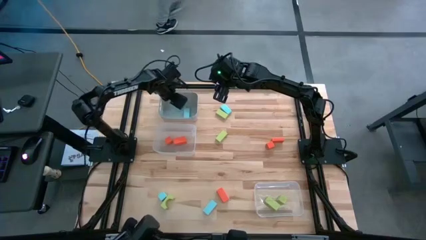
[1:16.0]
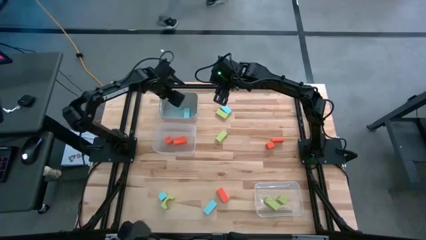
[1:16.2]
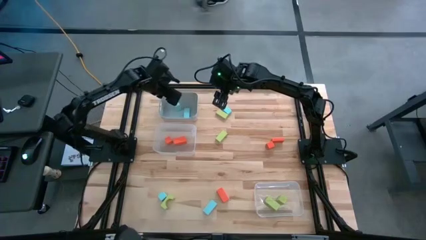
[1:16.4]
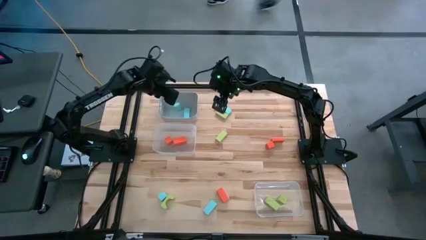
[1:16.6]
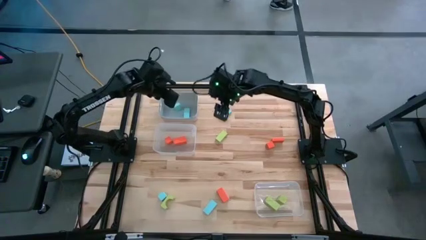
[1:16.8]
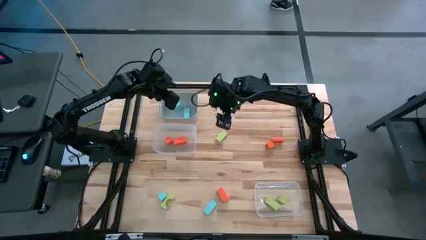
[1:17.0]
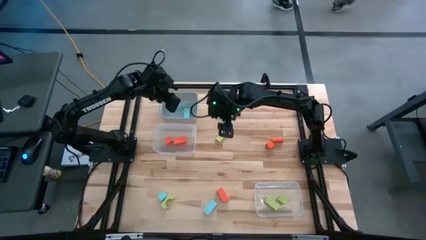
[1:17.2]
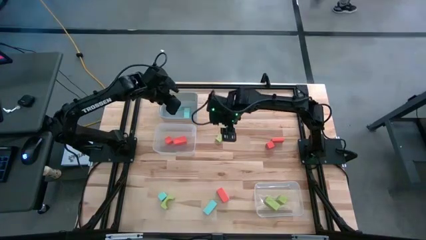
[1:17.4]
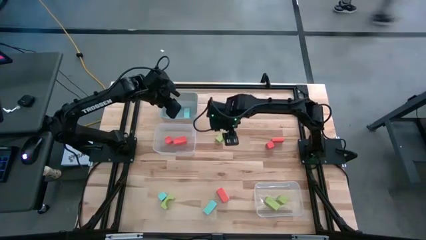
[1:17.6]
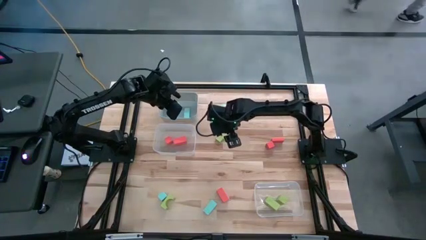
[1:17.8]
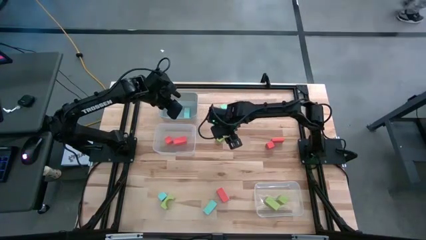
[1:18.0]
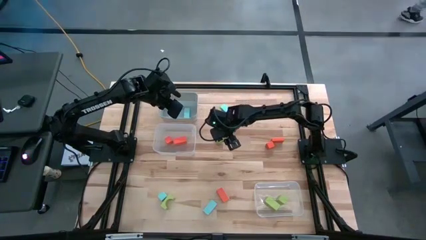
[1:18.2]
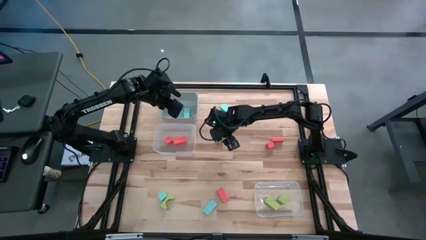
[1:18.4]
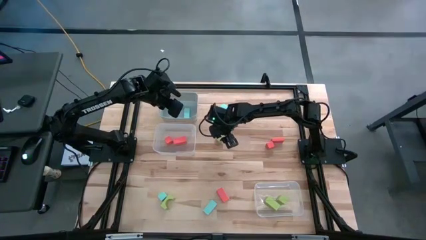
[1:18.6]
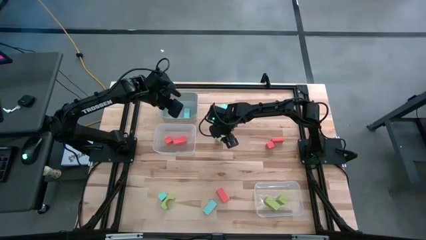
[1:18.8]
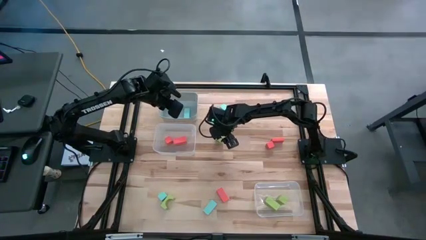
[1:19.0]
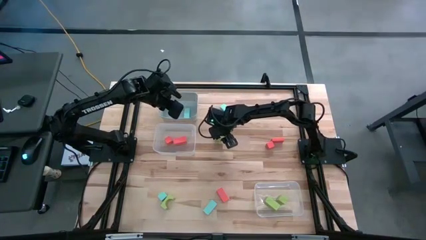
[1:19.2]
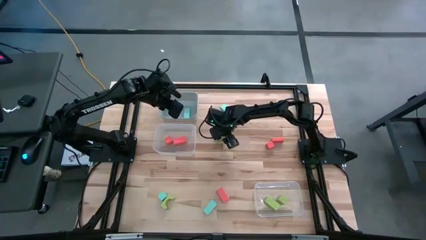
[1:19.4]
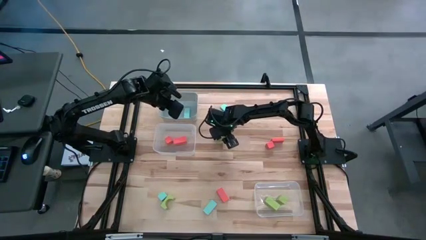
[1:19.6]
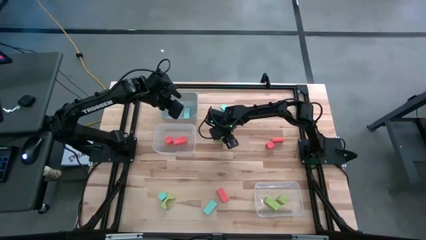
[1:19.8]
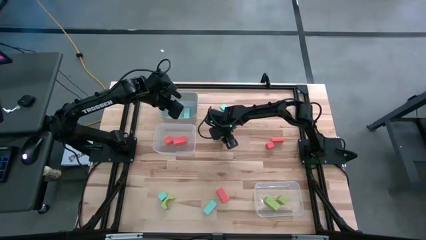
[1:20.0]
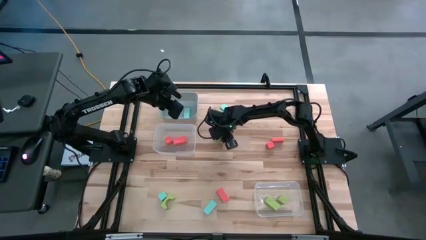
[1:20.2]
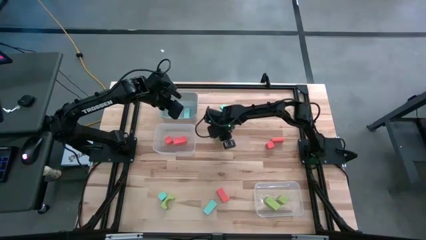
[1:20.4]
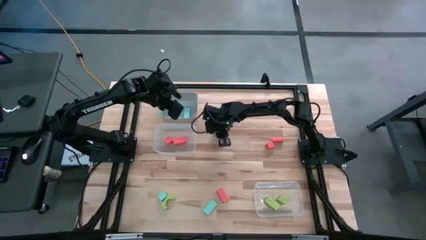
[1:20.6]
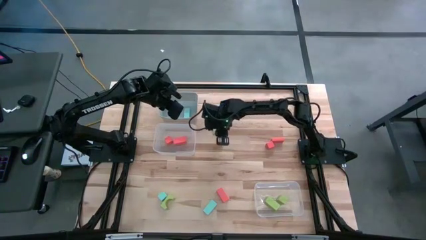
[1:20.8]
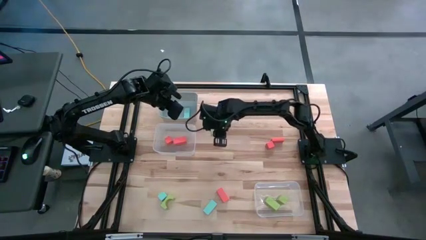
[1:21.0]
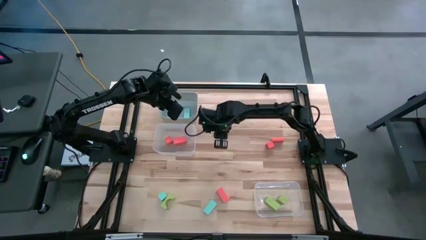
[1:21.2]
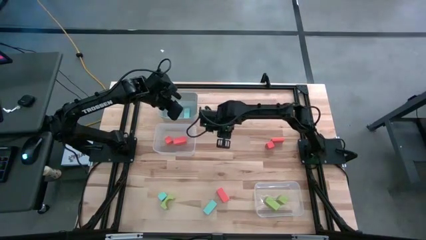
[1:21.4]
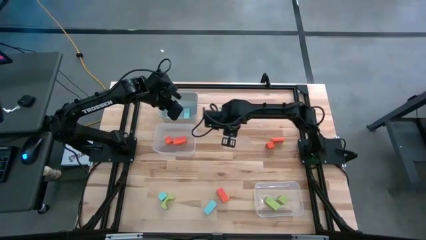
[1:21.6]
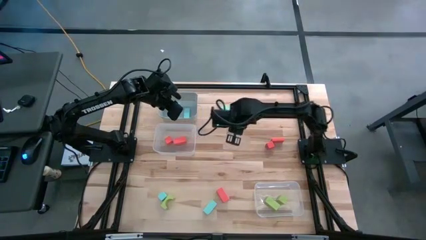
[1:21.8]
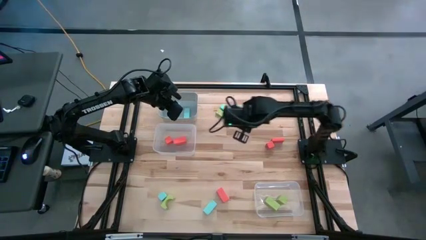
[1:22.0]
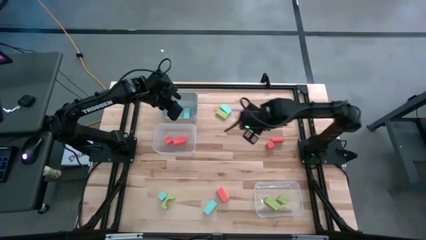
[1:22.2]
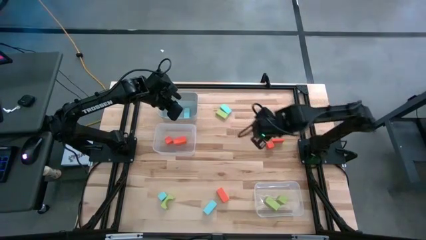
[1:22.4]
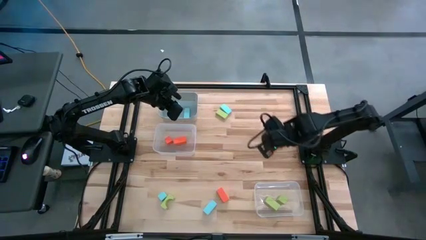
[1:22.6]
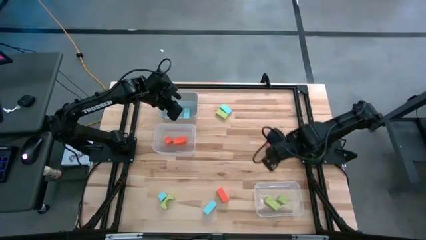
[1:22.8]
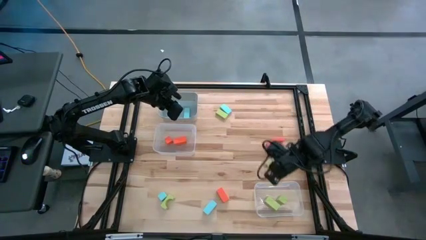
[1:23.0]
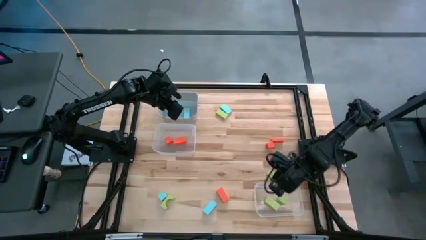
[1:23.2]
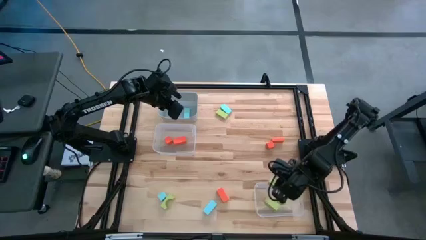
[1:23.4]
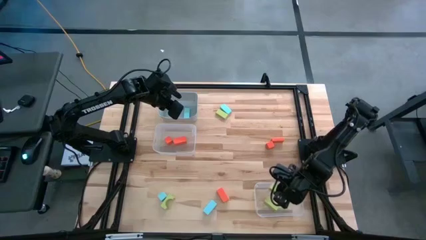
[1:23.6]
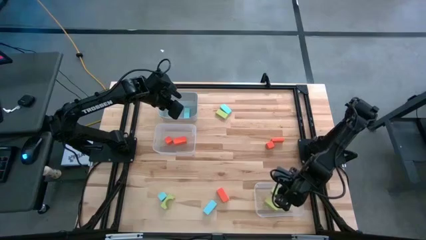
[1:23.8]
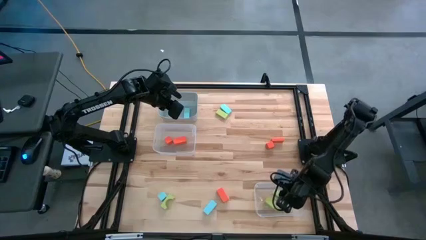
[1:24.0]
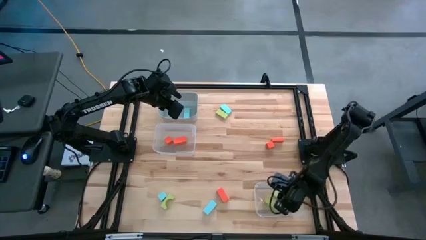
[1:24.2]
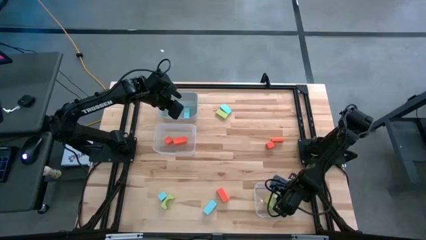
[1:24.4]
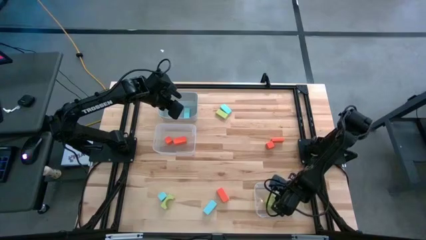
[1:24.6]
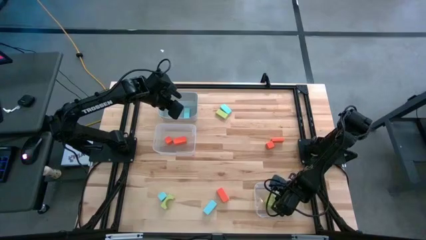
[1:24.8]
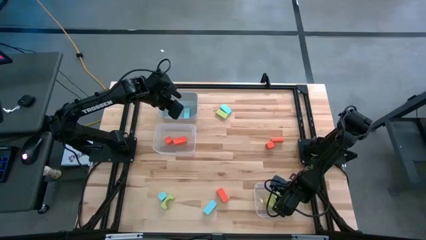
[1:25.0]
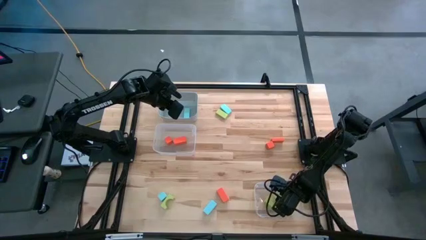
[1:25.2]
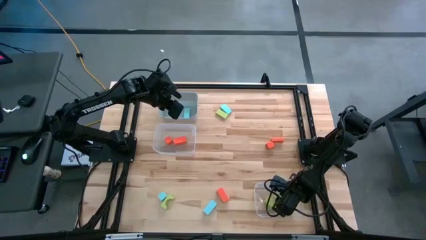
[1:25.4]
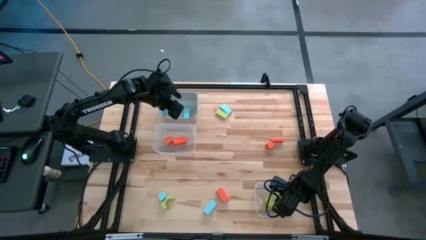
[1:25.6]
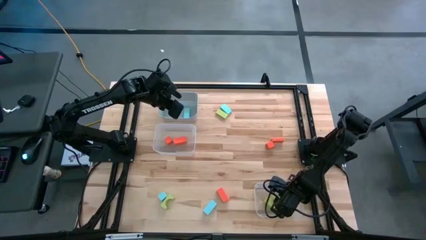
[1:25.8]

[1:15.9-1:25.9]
Task: Sort & place blocks by color
Put the green block into the bottom transparent bin

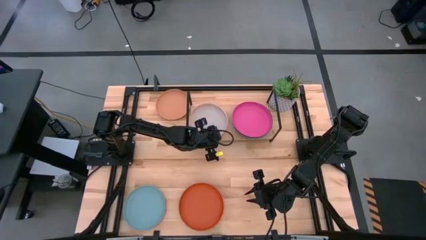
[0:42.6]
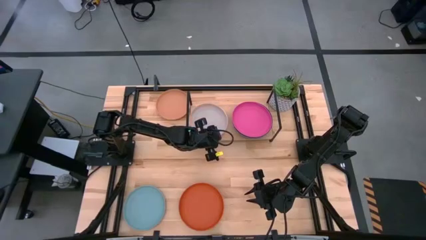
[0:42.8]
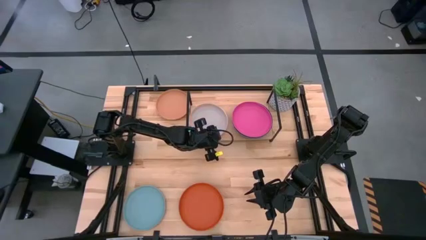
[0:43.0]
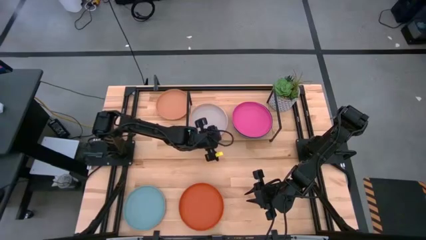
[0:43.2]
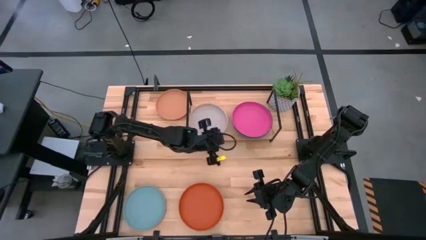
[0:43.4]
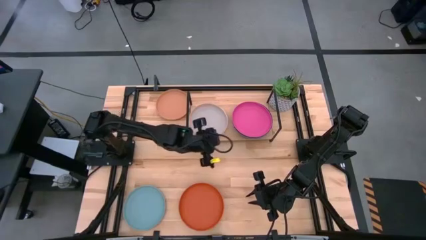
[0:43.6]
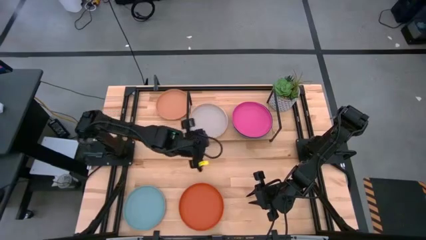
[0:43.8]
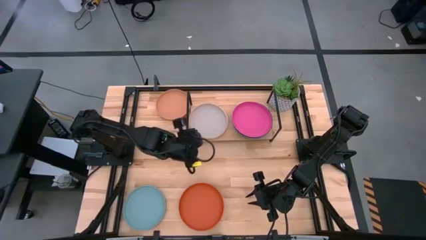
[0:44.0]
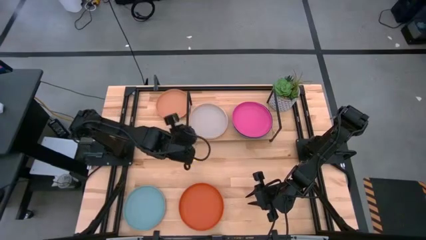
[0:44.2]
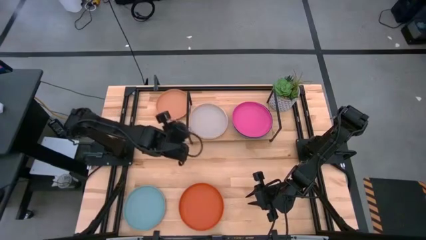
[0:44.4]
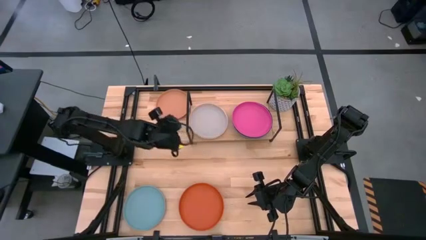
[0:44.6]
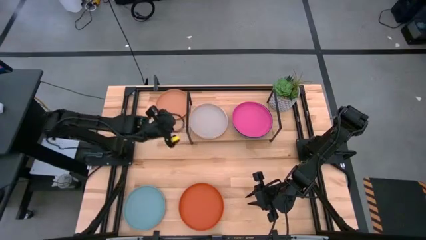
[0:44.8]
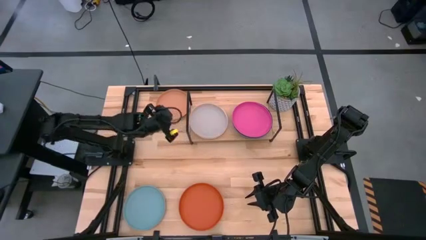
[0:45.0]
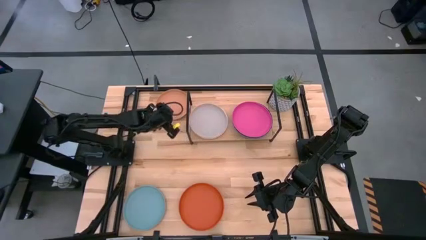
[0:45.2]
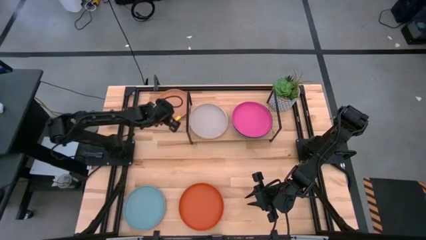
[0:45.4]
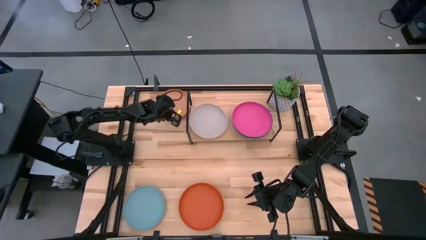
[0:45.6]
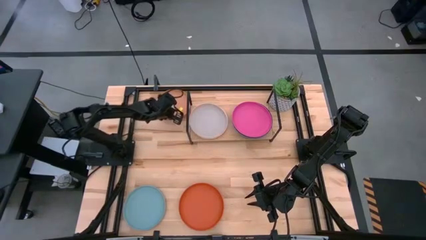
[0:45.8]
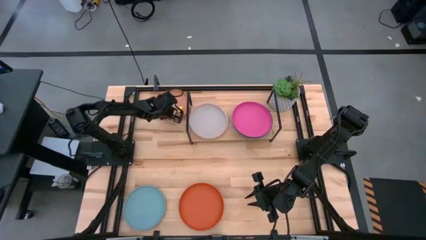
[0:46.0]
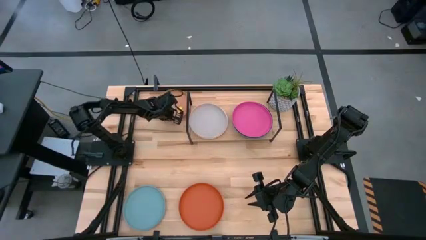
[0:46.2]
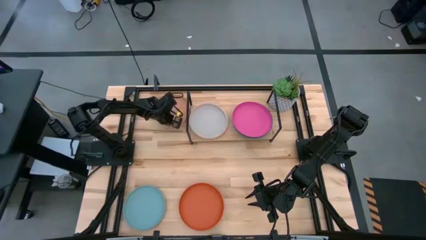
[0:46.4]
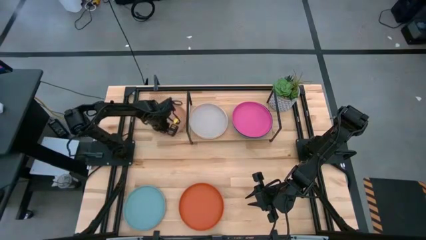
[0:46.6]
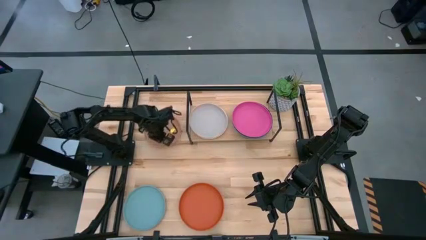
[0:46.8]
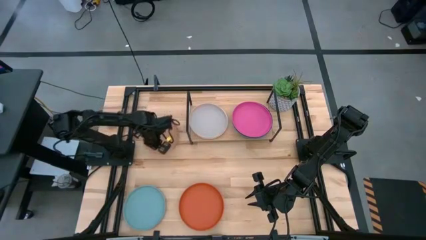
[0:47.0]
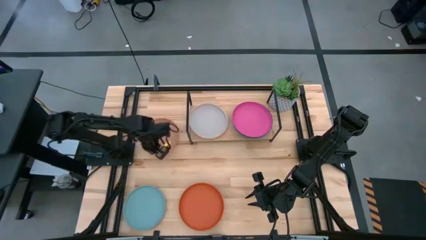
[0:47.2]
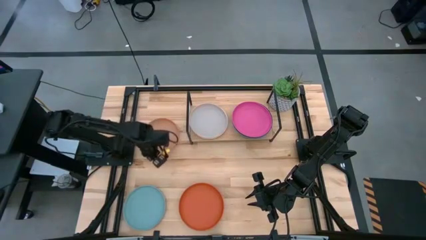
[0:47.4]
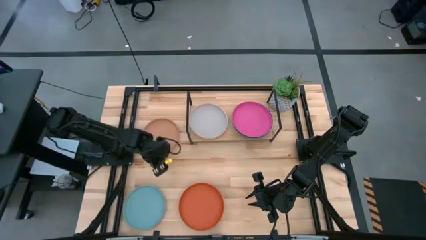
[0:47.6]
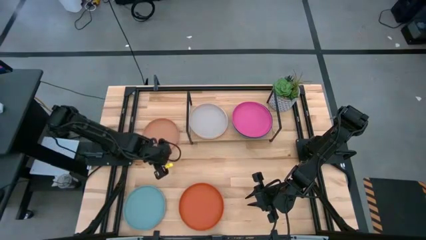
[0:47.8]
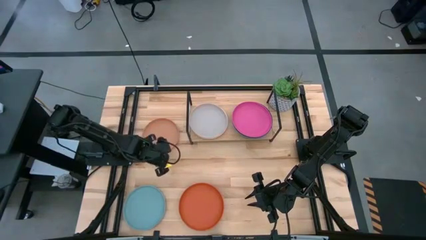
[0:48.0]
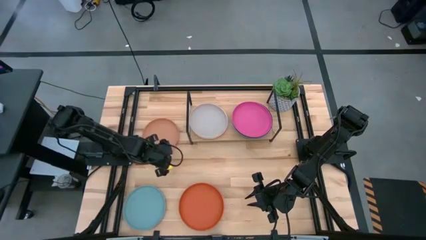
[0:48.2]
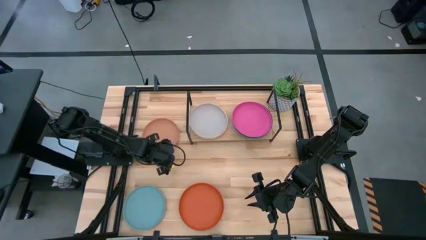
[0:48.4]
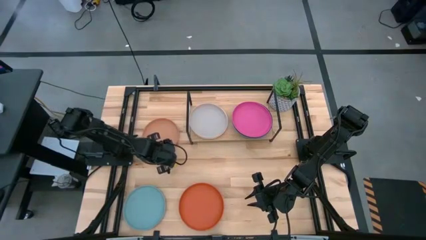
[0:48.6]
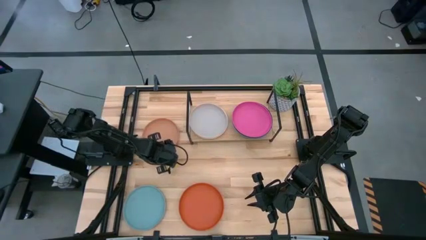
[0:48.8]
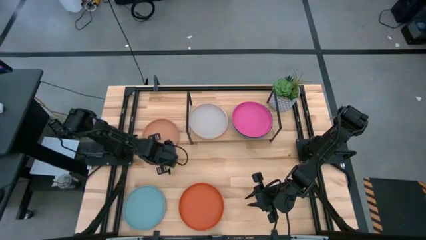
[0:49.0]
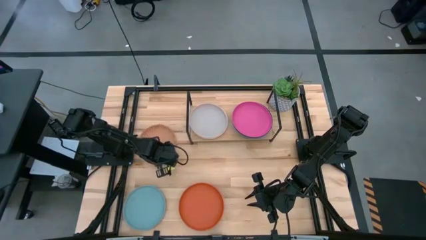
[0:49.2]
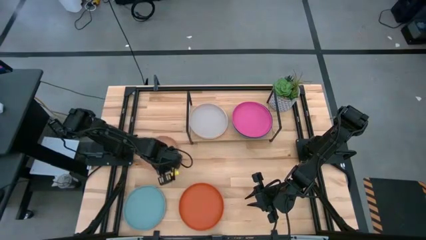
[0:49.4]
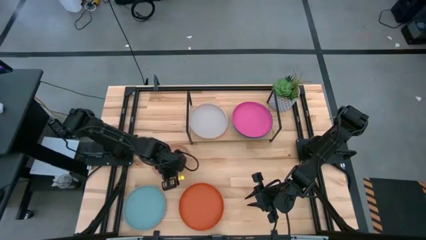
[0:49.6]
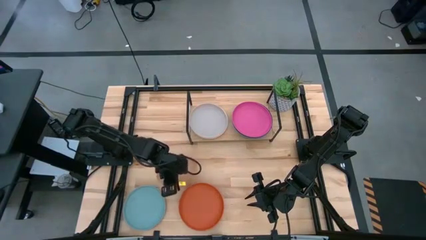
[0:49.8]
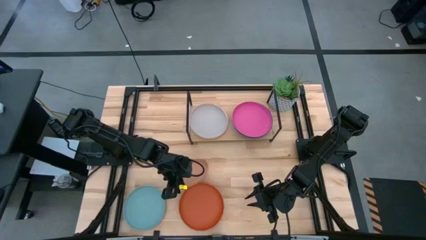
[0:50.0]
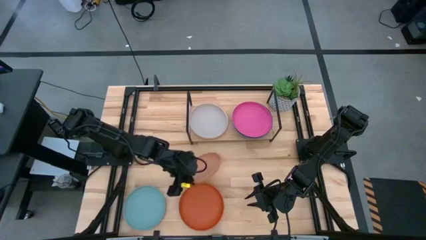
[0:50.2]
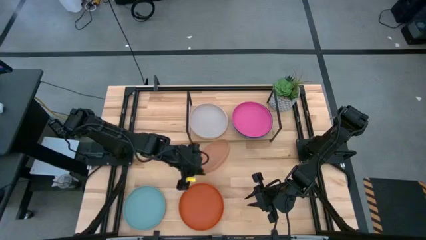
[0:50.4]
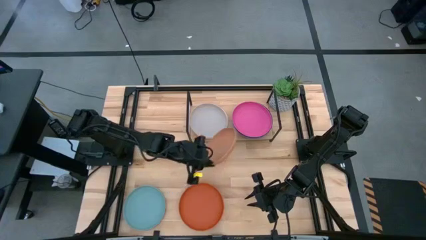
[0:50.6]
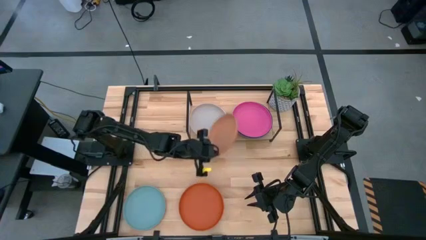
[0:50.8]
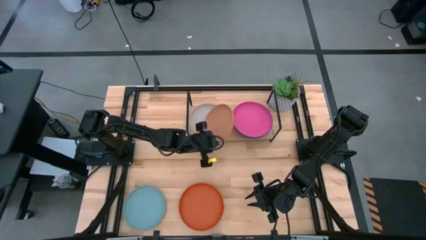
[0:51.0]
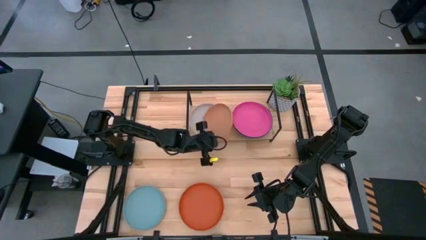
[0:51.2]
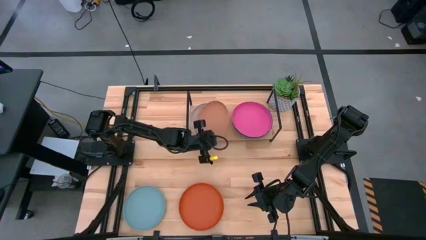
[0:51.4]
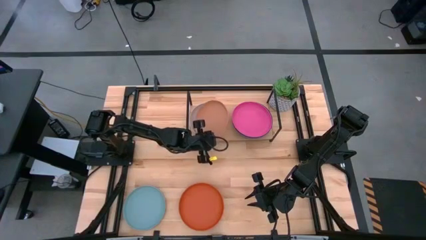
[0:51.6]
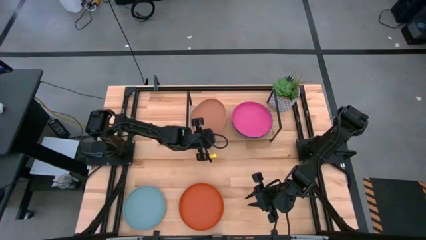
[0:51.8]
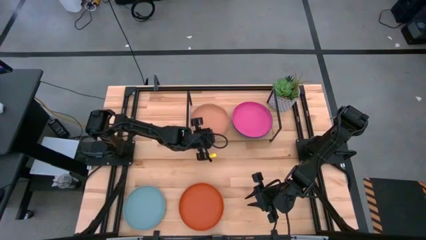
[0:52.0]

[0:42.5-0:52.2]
Task: Place and stack plates onto a shelf
Stack the brown plate on top of the gray plate on the shelf
